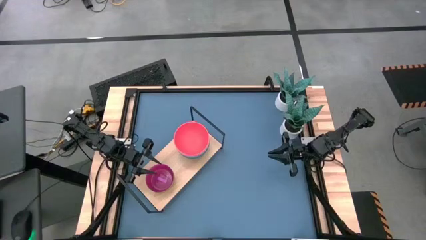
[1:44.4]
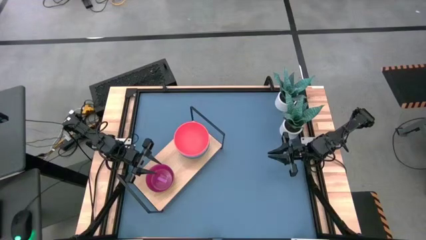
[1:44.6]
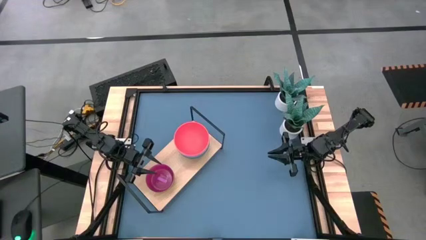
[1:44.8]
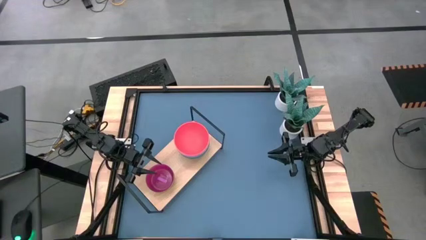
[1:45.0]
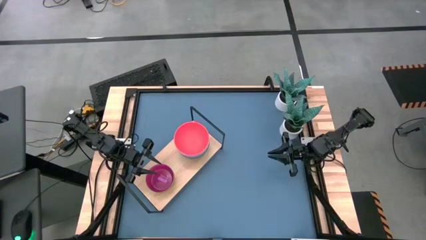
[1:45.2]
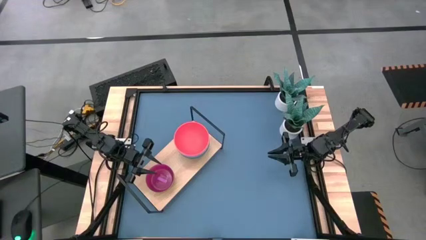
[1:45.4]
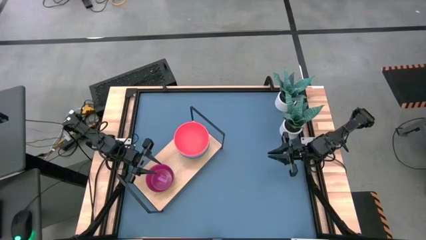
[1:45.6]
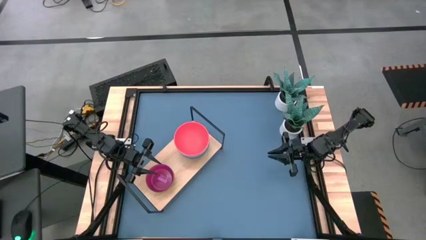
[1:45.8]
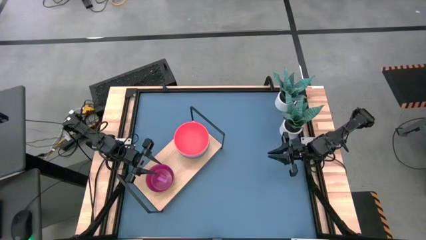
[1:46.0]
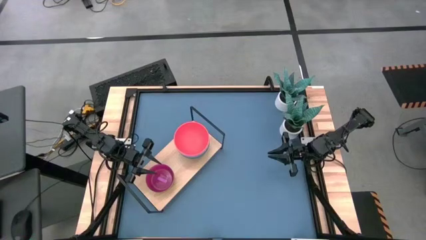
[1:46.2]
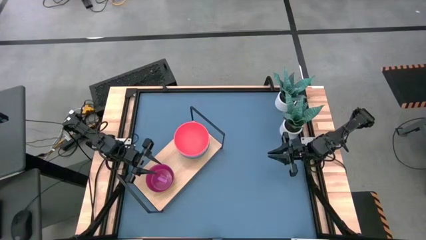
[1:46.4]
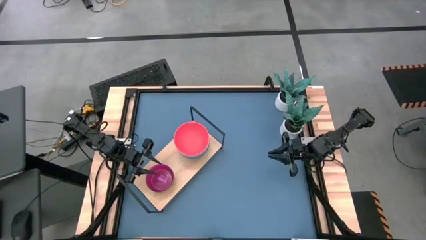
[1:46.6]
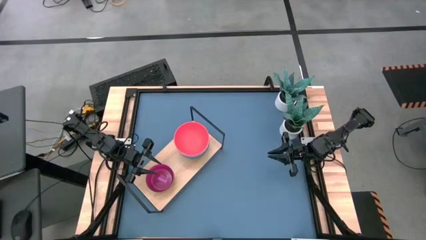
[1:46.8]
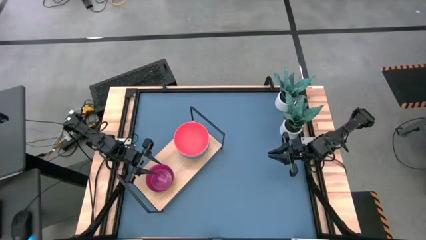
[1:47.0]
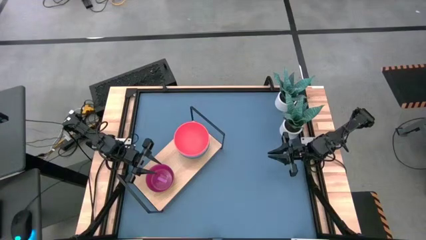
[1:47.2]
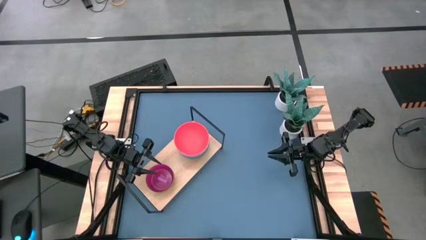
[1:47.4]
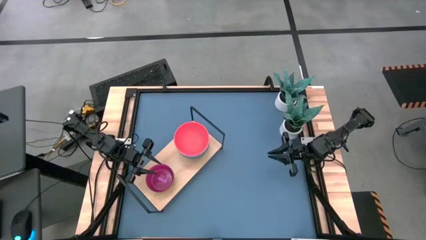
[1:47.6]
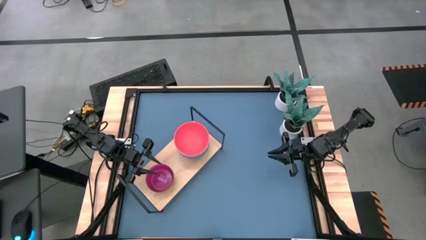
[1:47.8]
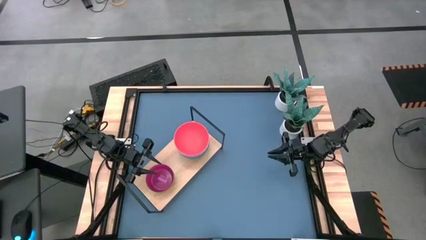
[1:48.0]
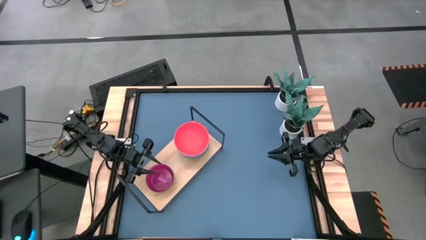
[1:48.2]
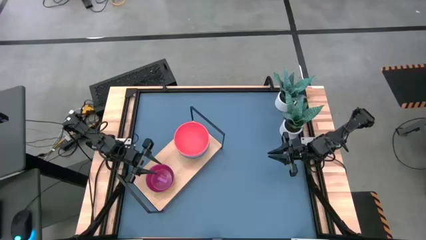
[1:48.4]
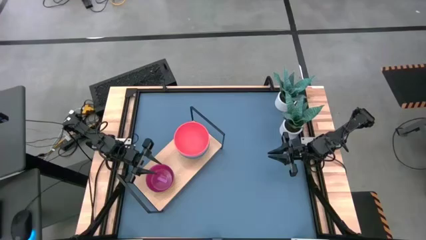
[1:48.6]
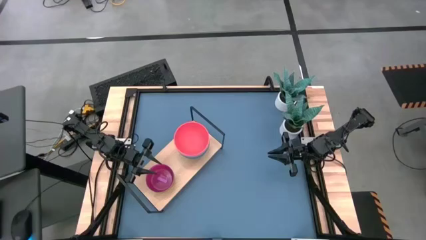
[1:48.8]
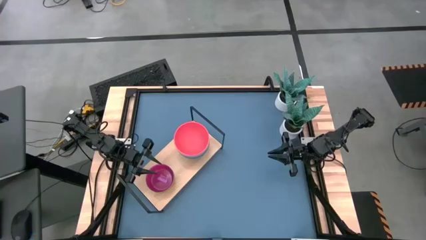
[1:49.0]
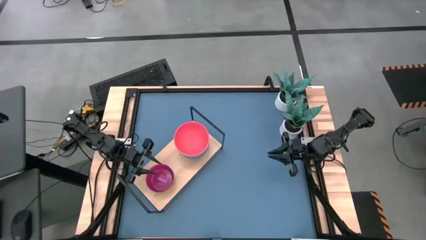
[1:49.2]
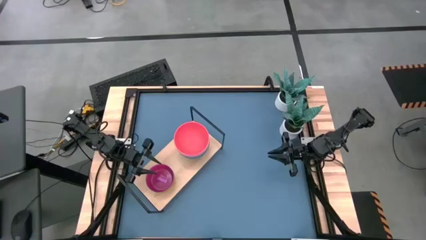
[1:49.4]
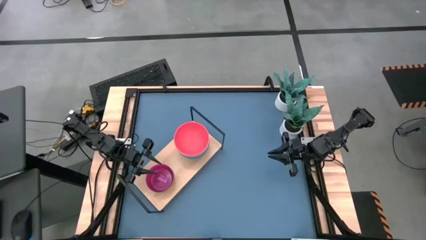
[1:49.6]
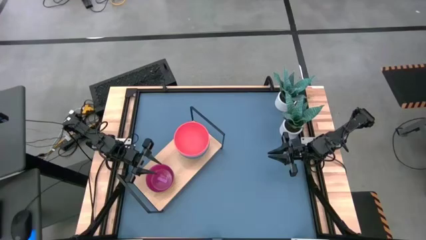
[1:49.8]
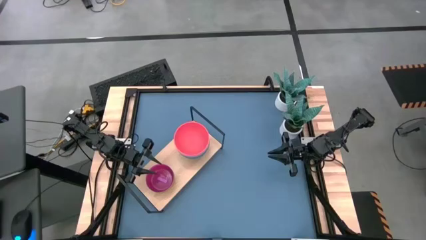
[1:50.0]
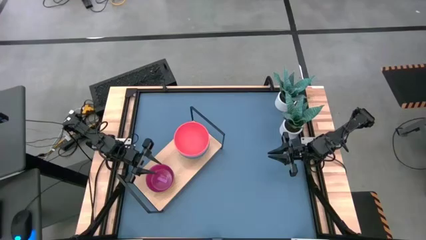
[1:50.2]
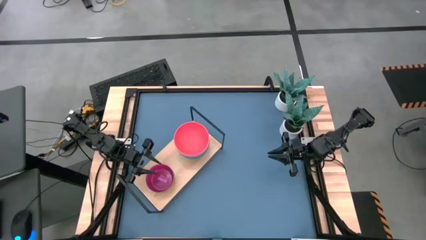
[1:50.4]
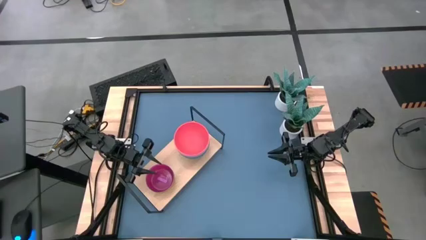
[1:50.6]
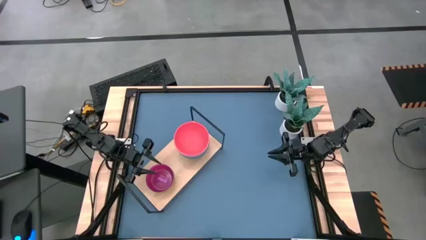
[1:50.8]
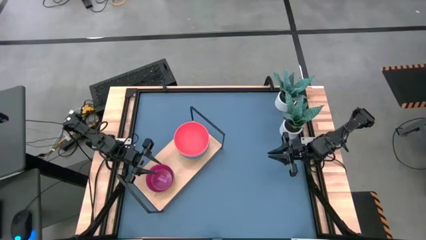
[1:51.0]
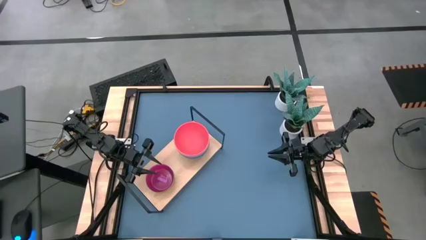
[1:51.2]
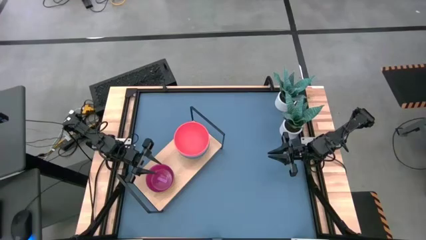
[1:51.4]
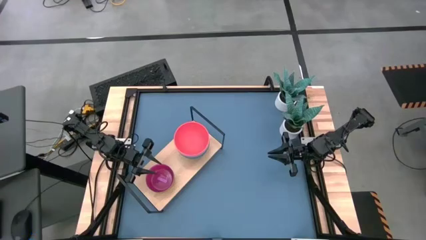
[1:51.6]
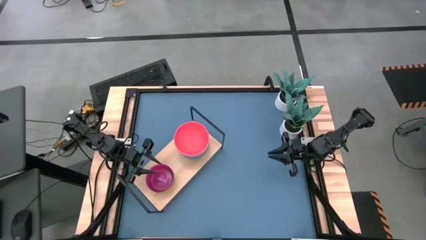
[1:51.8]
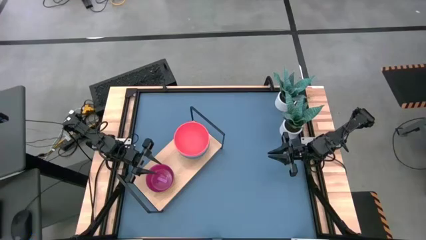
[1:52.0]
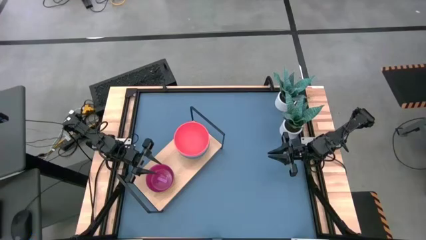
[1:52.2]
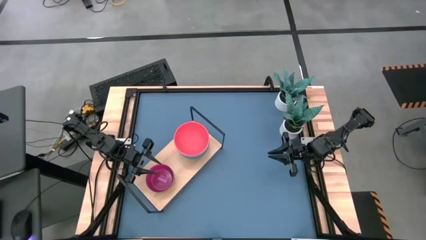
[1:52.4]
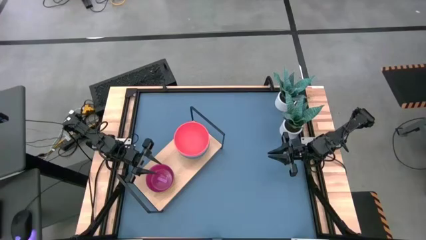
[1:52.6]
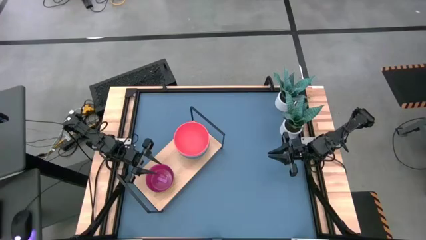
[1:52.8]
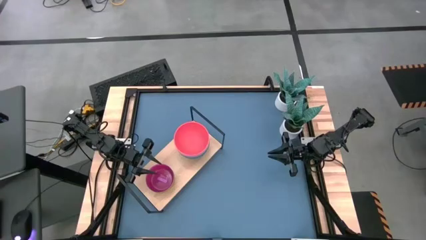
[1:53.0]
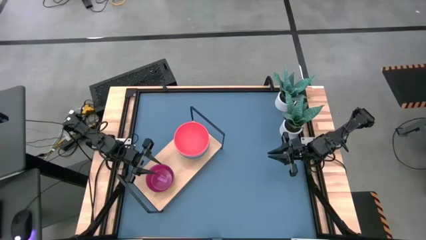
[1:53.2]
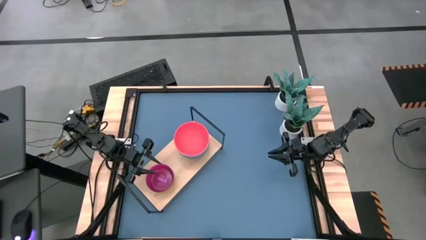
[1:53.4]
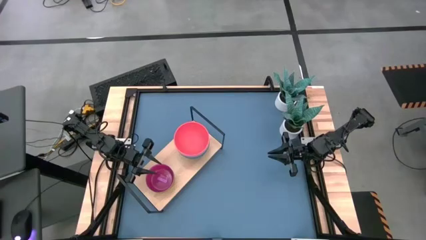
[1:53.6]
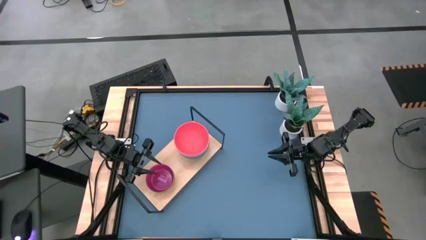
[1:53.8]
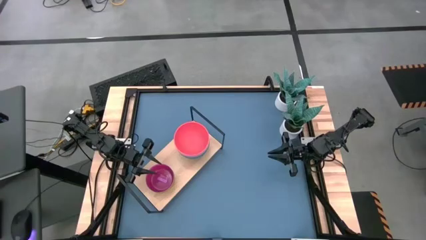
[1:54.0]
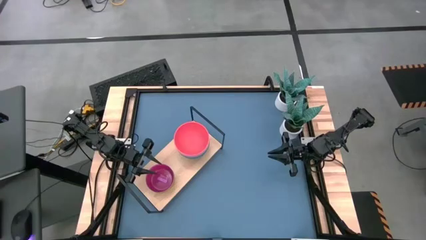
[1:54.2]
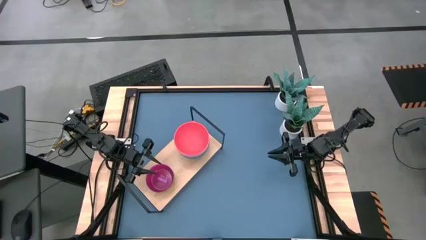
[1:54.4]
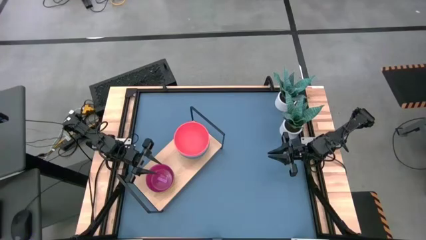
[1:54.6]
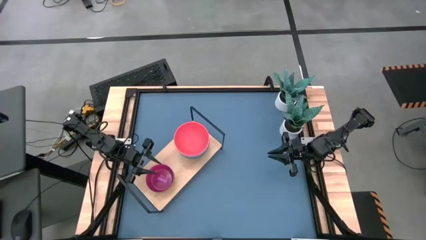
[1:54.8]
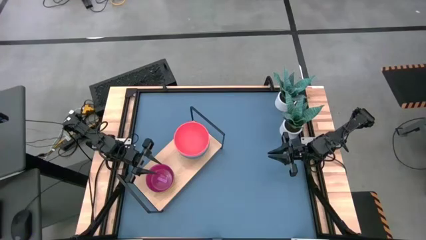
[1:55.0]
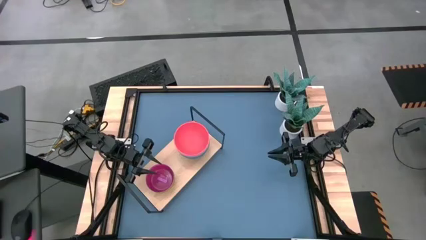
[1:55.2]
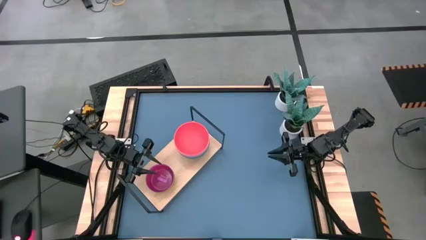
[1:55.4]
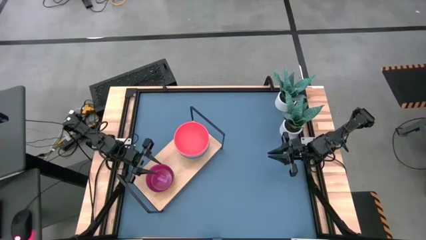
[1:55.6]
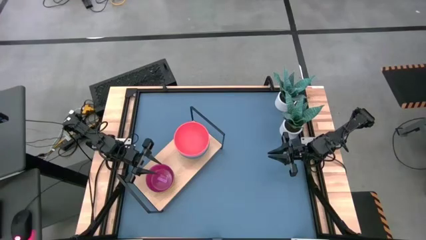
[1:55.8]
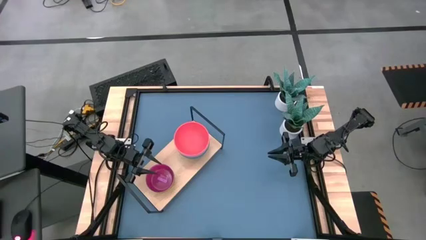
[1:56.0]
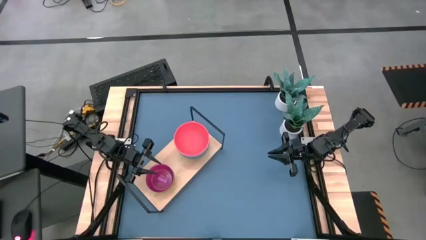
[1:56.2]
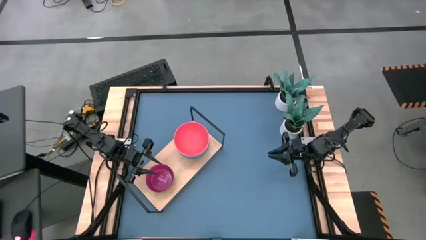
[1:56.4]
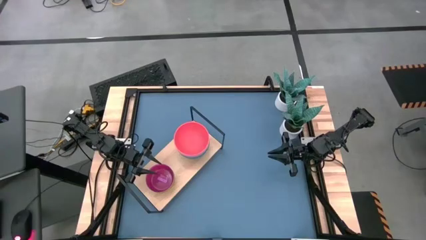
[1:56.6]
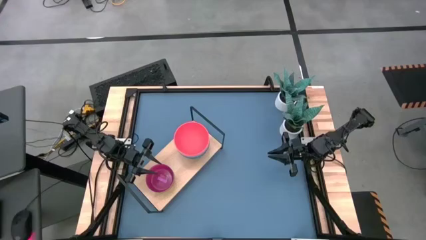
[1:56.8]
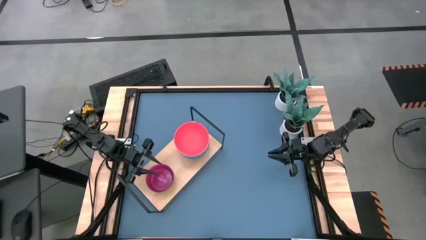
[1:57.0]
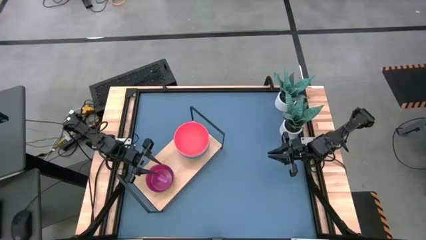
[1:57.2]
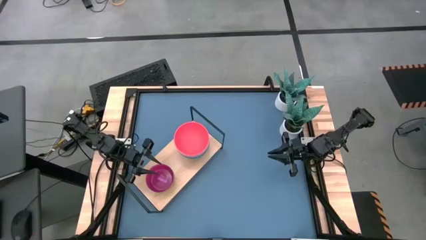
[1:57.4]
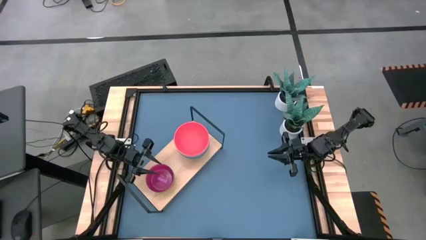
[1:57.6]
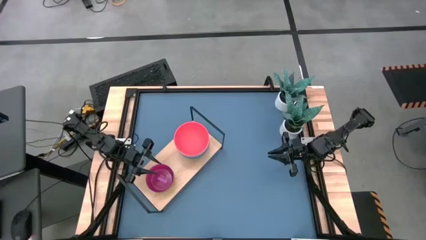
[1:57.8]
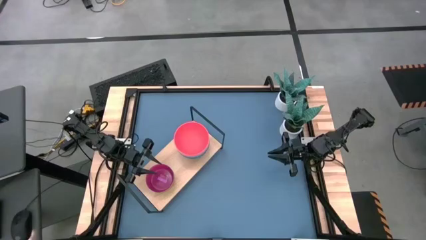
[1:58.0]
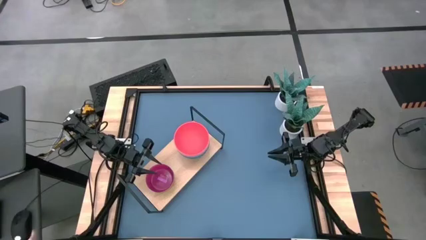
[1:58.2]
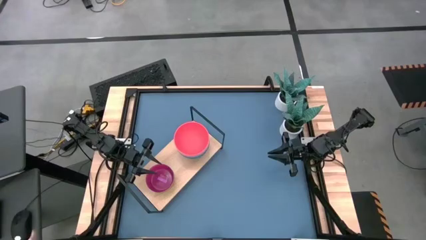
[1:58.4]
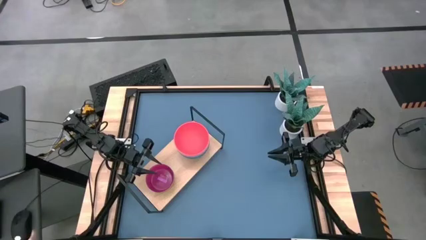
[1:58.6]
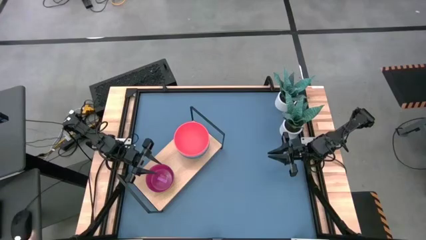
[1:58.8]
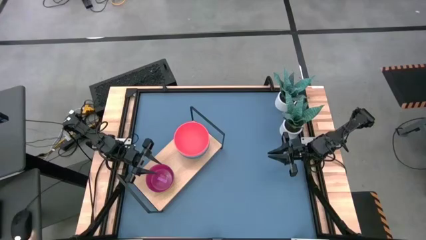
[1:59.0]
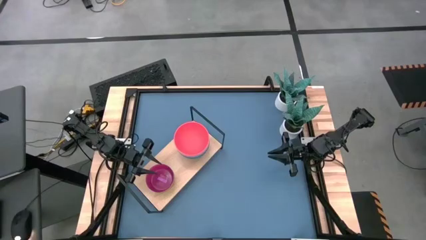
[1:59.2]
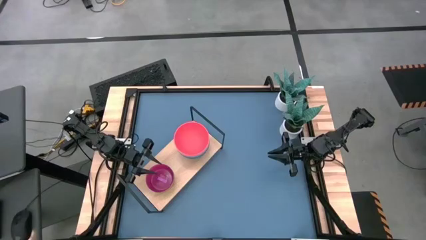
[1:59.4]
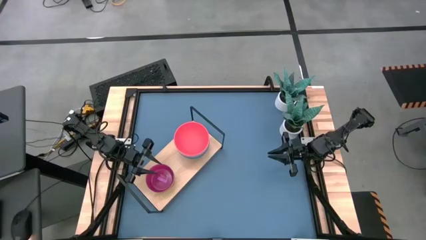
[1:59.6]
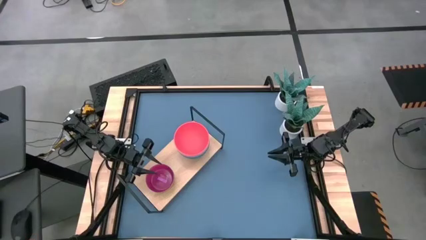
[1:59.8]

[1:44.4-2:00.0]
Task: Place and stack bowls onto a shelf
Return to Home Position
